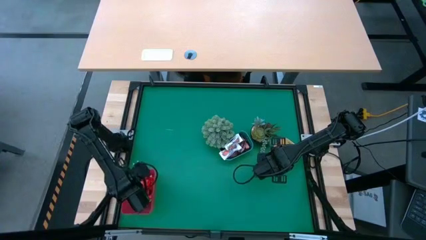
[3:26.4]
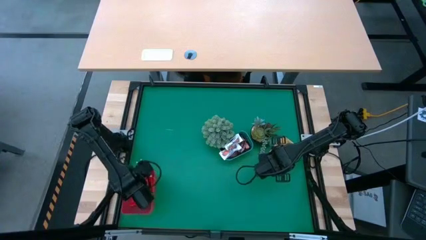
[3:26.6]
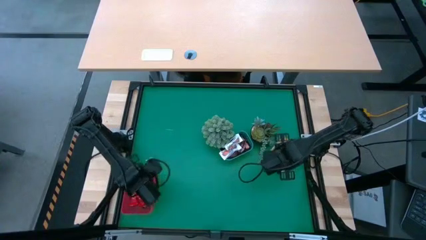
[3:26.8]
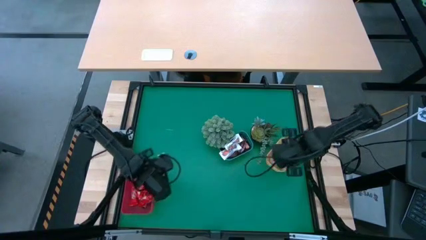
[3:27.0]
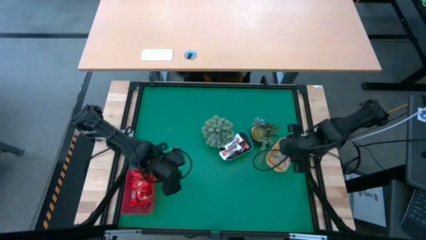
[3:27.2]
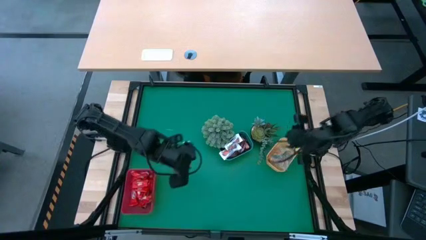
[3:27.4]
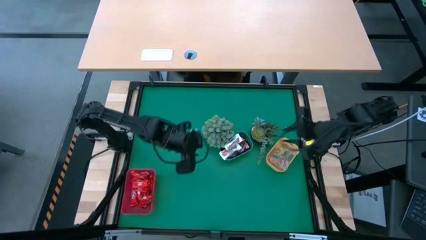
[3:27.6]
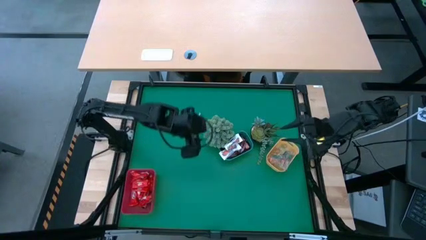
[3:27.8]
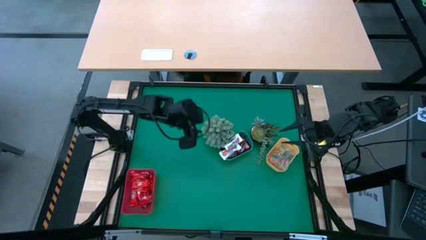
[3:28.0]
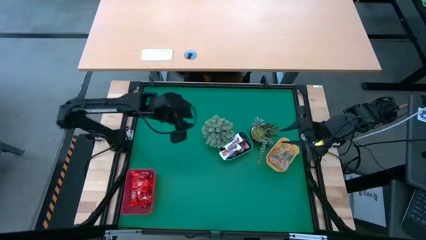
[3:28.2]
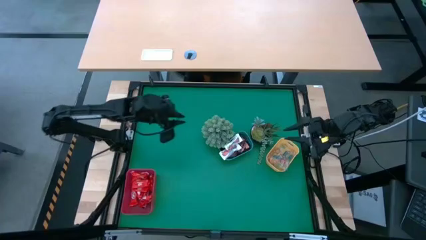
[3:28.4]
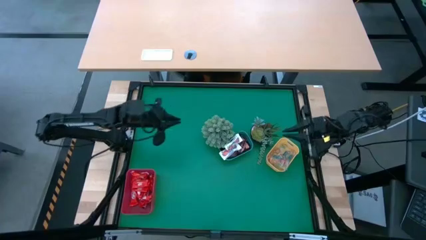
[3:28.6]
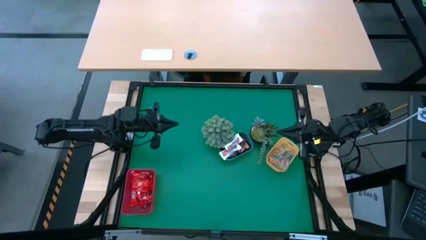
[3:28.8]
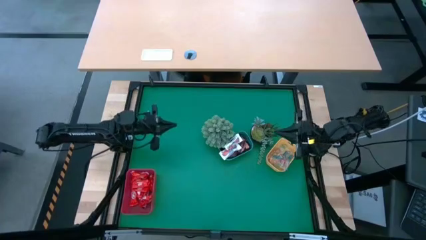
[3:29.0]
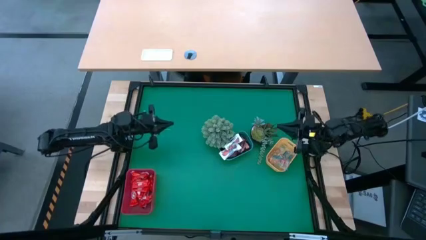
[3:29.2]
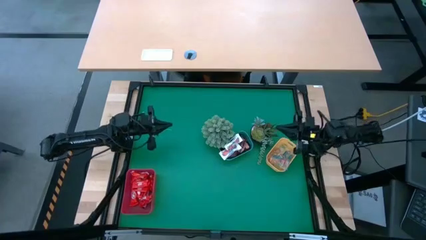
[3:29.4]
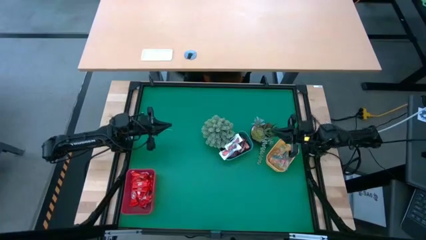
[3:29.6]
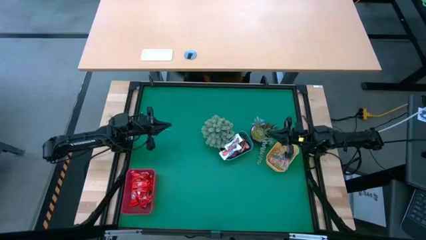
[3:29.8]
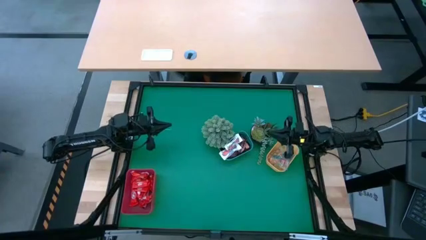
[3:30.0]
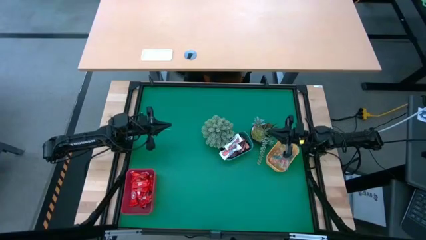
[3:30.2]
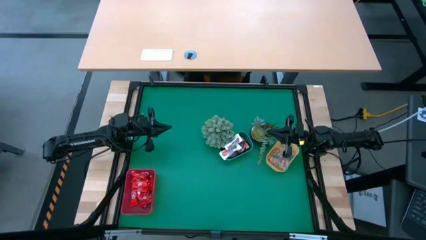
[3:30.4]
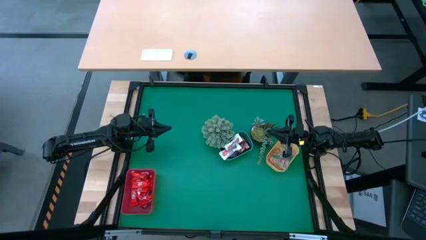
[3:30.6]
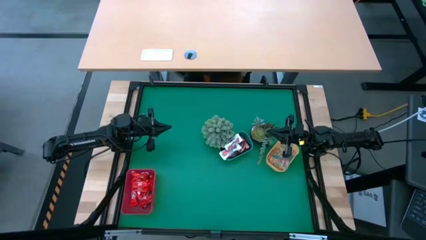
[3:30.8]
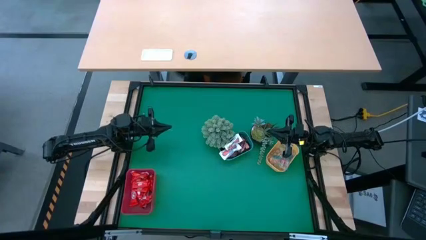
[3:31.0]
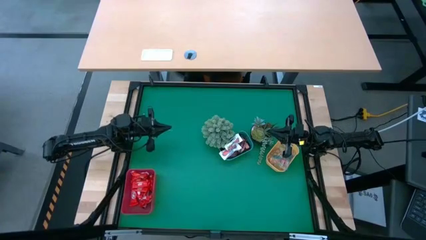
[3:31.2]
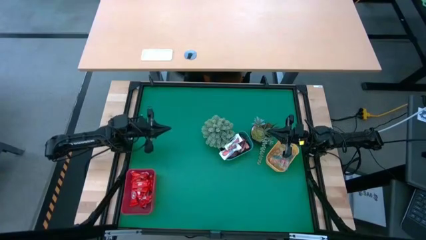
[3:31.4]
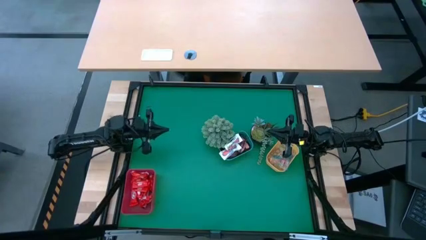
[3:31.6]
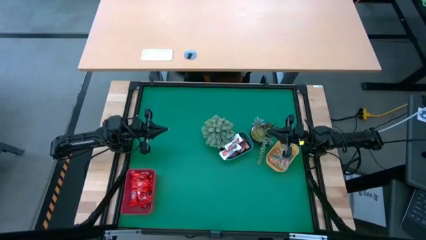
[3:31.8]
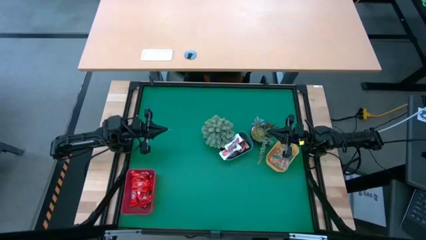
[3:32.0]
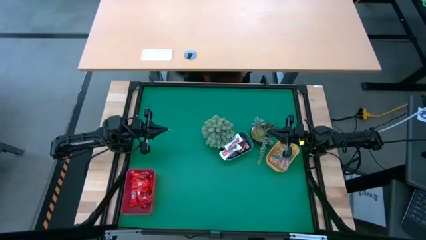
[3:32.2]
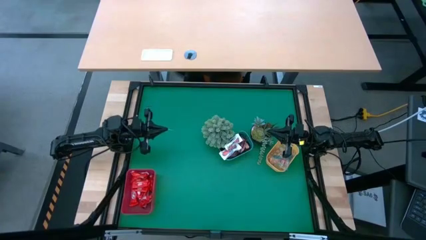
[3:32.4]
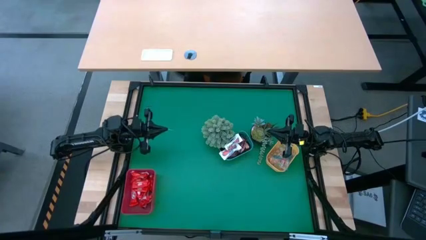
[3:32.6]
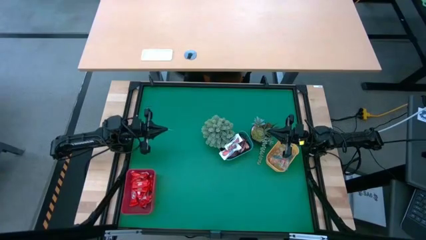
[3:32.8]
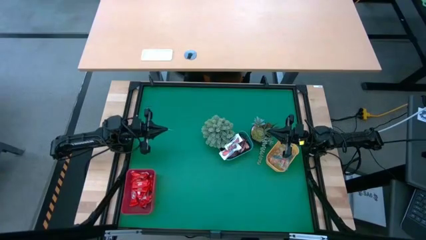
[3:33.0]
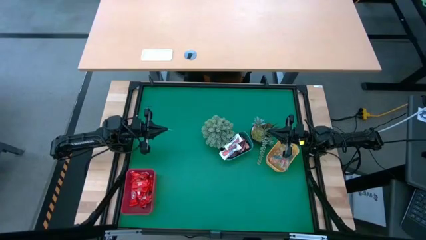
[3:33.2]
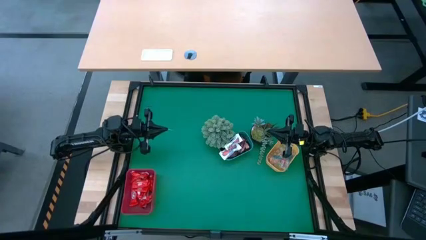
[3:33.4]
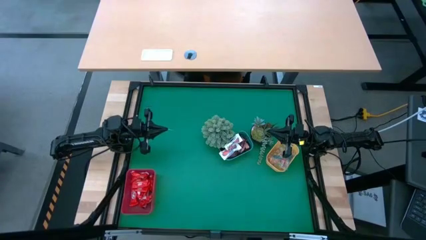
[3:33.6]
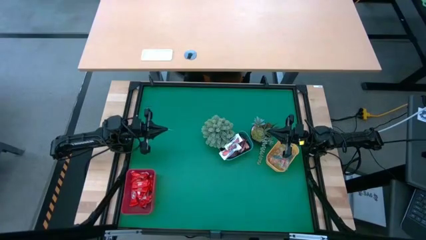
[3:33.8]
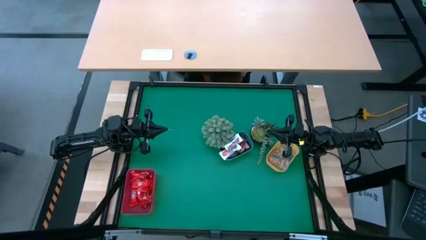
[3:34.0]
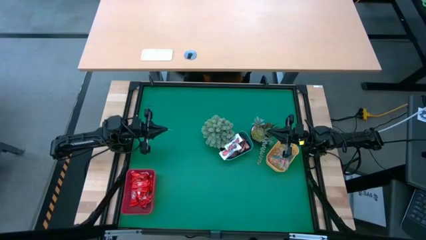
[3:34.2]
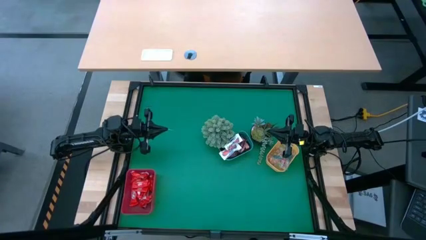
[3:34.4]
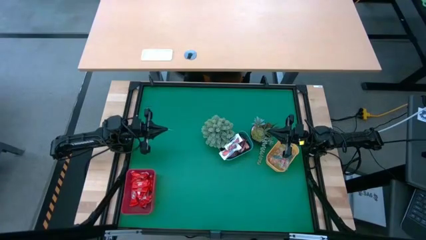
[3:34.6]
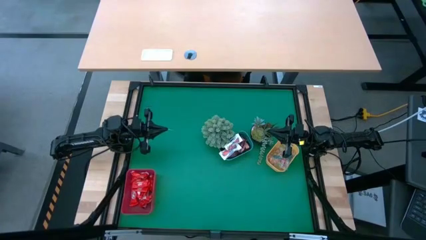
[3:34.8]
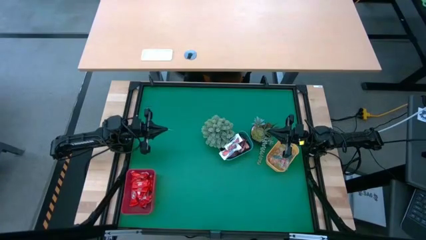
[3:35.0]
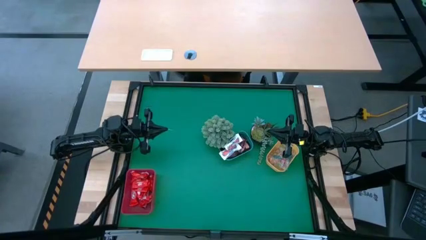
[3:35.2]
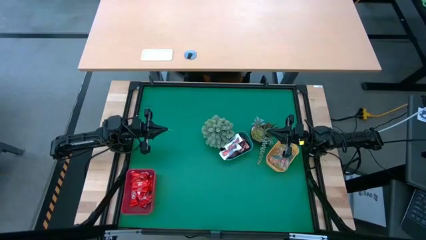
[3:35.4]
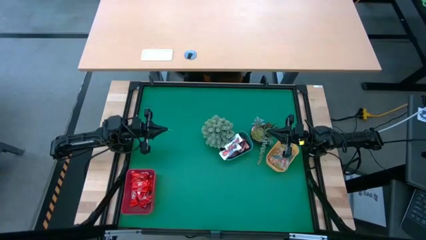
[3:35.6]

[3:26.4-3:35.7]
Task: Organize candy in baskets
Return to Home Position

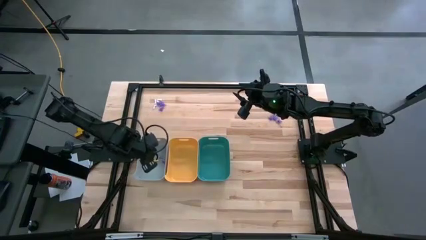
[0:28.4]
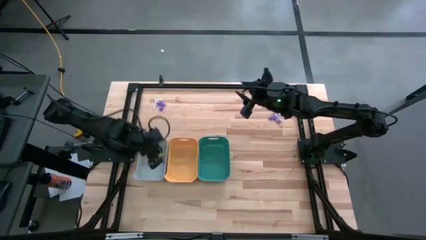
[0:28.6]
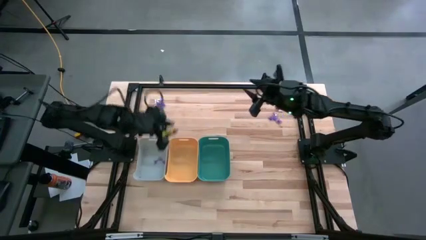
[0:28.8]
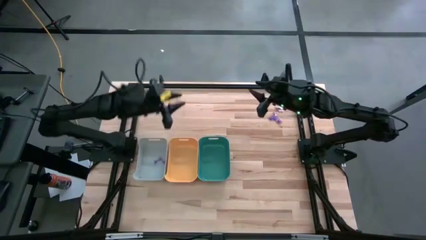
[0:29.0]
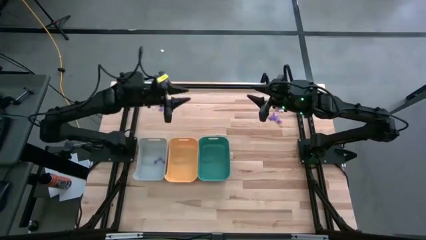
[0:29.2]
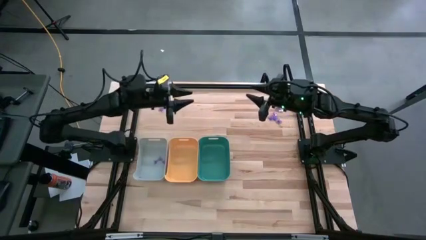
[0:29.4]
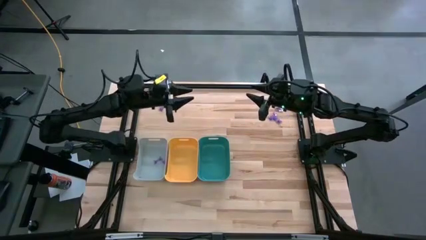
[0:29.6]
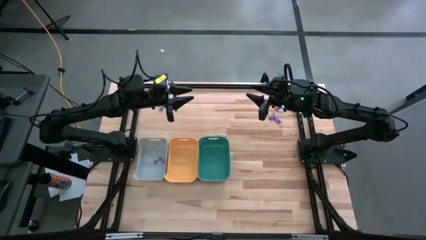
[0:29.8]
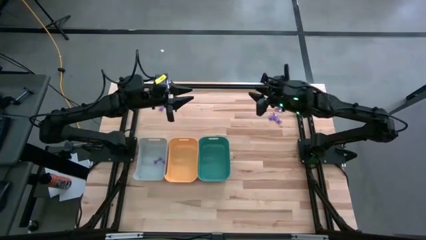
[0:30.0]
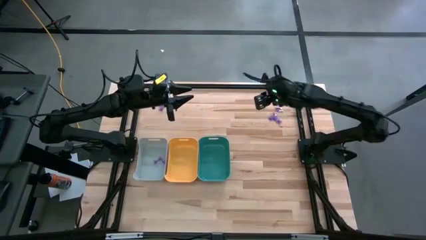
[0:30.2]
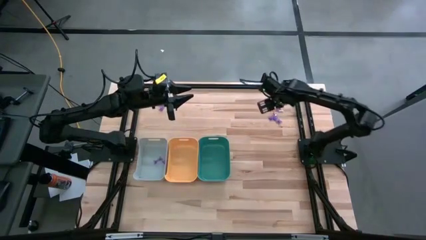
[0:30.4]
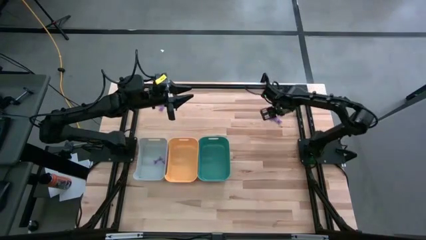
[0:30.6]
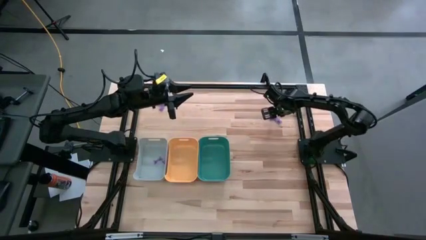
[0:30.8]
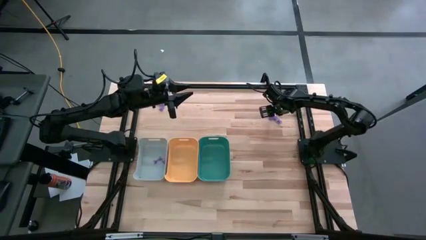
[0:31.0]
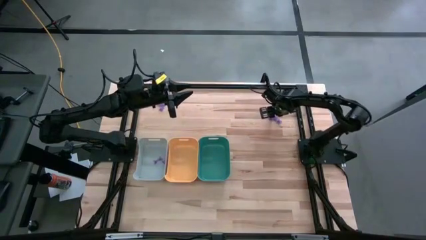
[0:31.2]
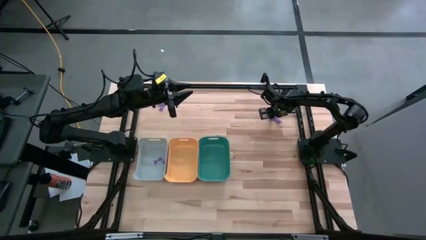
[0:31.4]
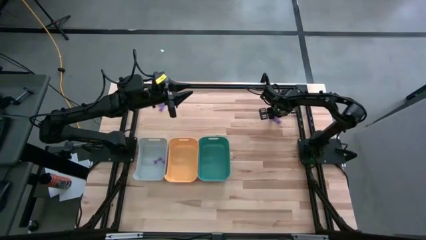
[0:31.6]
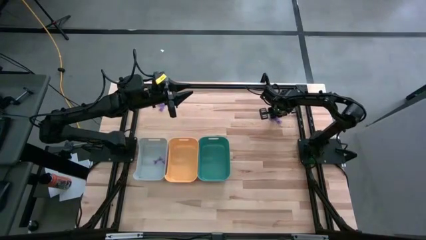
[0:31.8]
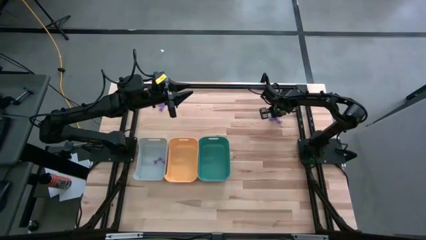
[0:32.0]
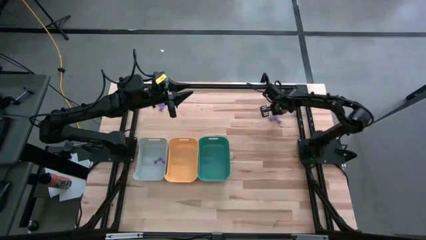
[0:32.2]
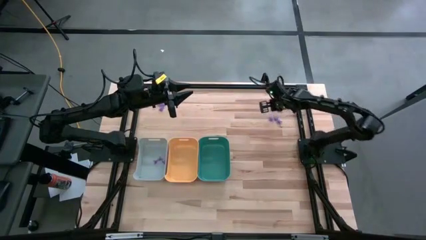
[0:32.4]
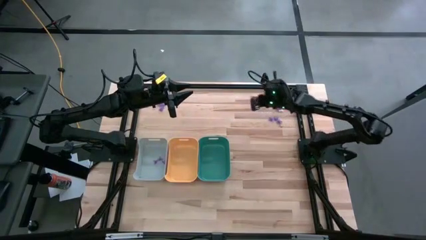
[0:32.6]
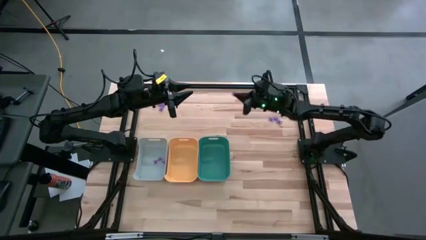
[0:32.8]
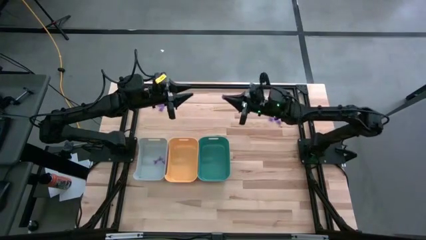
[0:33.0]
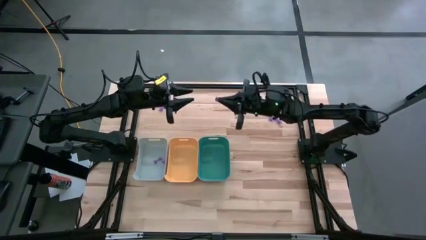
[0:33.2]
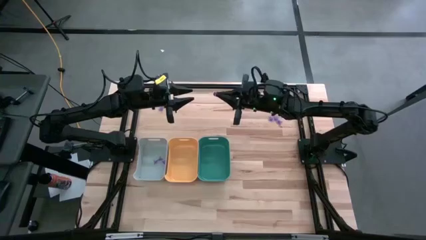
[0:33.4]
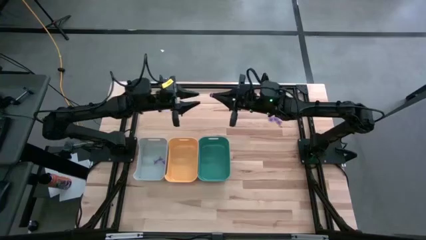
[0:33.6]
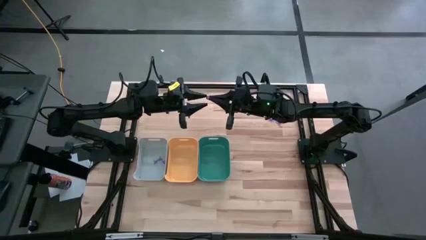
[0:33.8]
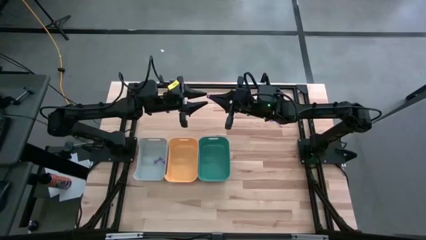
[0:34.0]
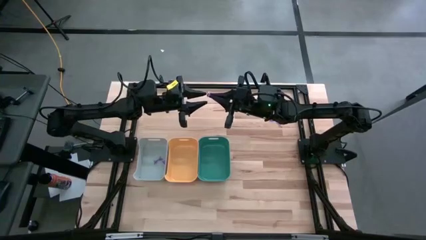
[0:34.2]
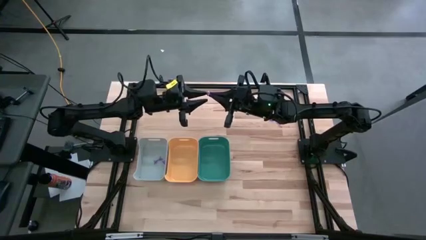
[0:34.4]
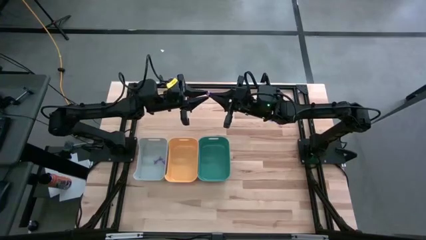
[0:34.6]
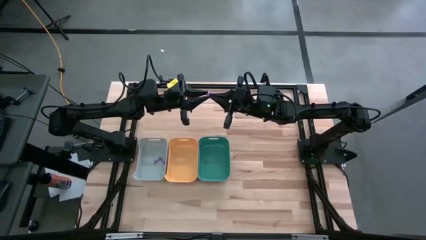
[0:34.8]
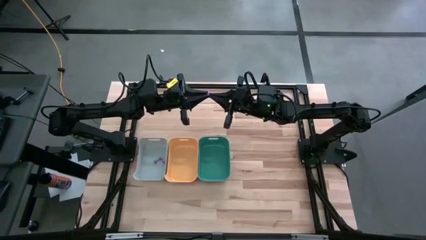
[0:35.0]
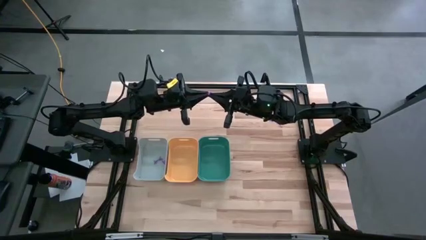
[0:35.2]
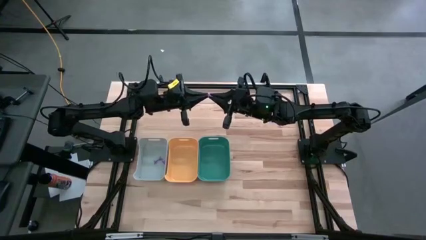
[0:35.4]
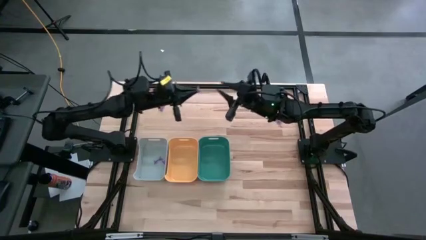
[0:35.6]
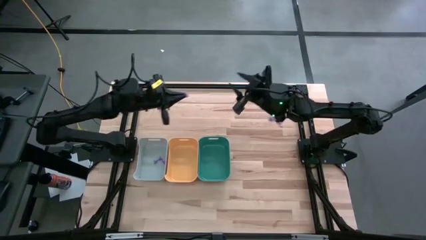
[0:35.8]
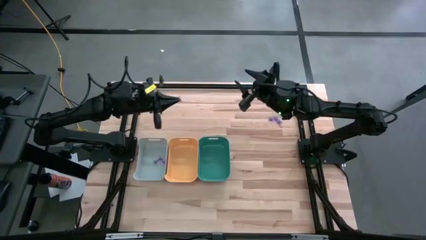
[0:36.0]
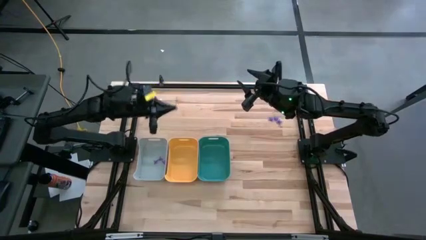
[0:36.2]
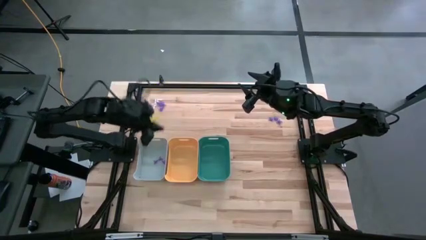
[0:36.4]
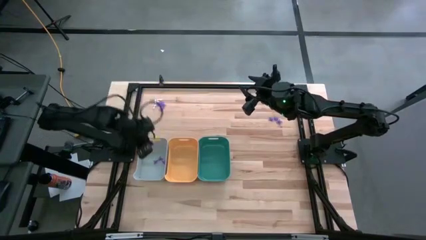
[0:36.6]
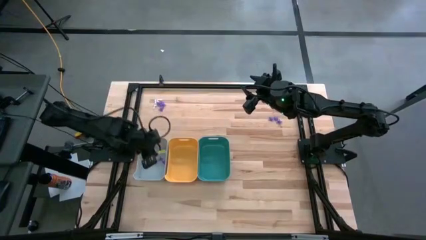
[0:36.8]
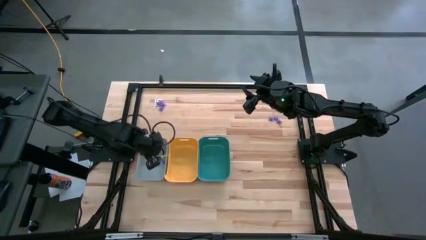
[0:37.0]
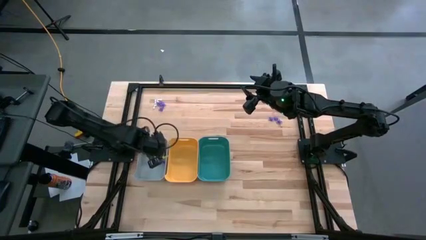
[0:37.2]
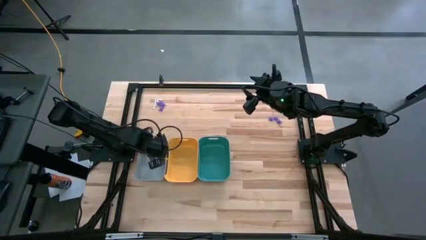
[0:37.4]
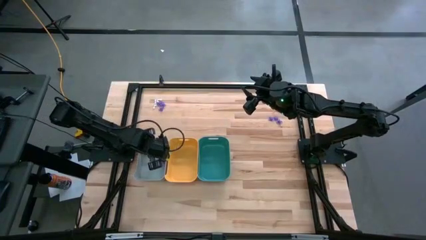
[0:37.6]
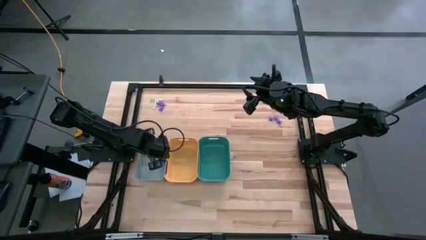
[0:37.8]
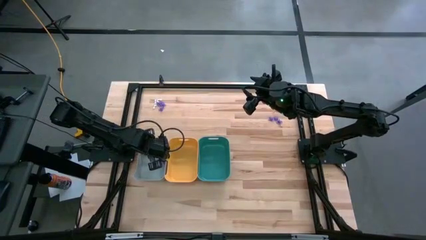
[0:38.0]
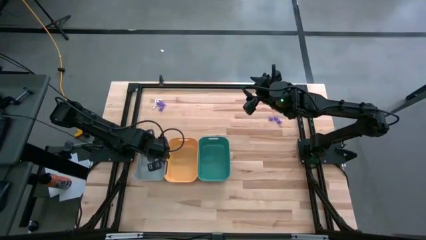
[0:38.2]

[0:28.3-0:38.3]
Task: Sort Halloween decoration
Put the purple witch hat toy into the white bin
